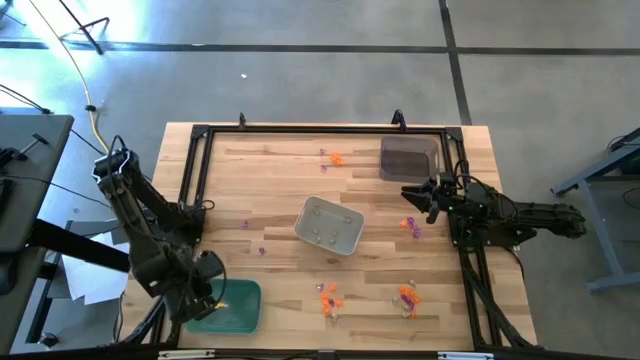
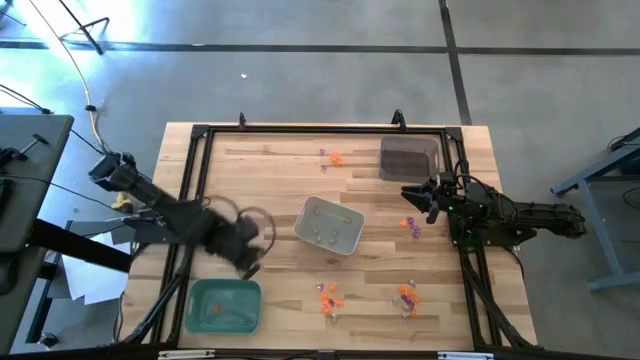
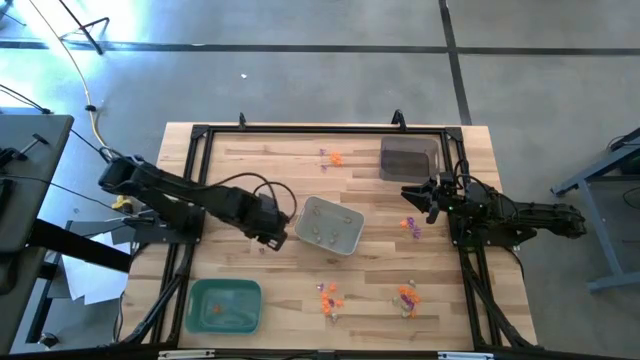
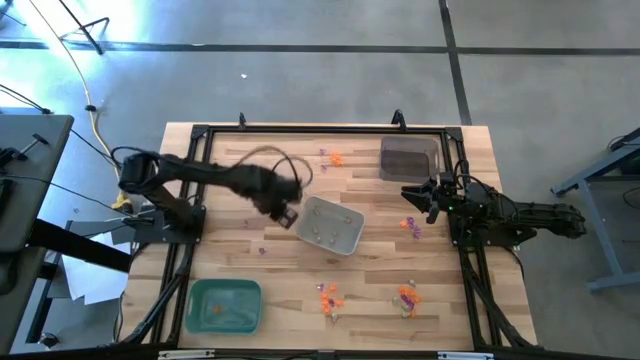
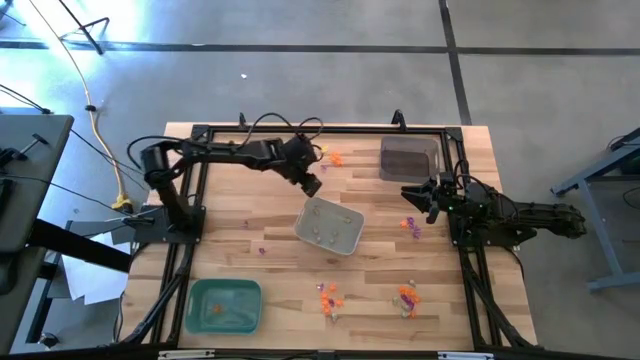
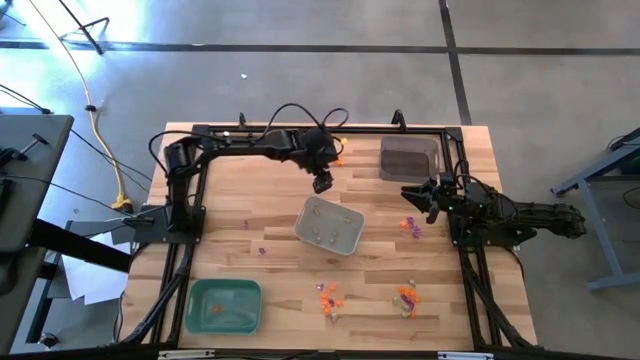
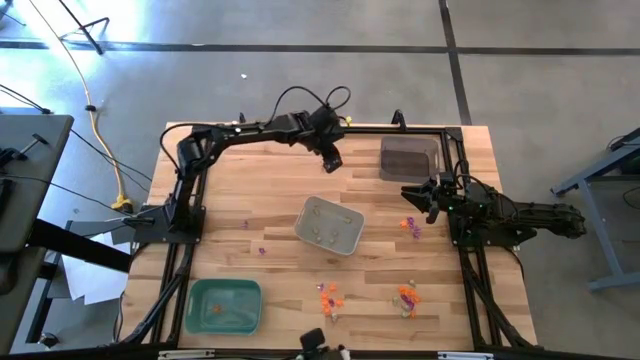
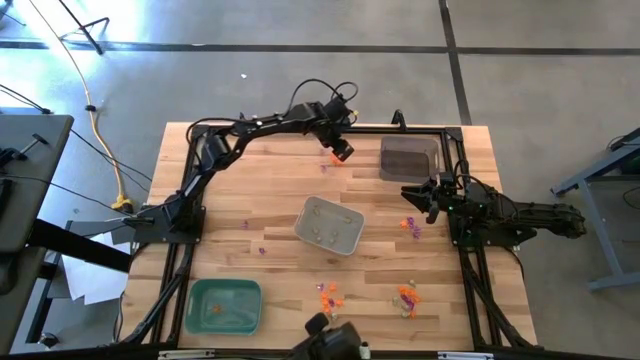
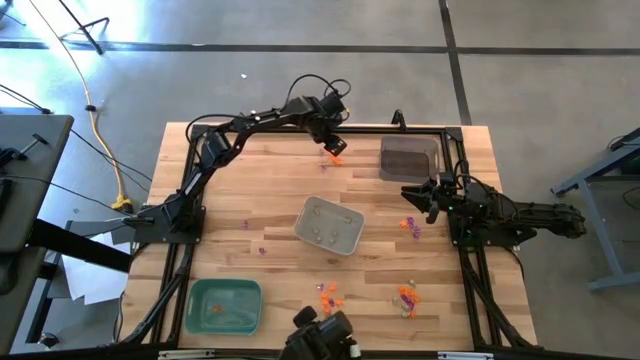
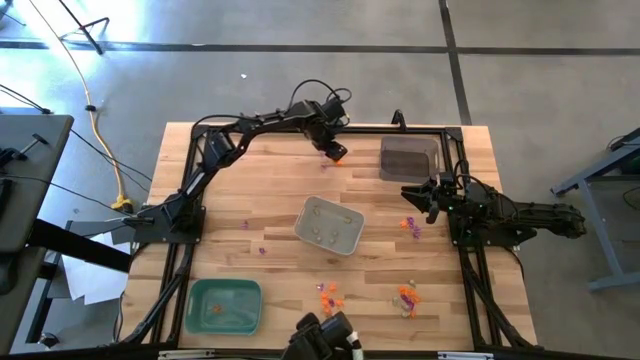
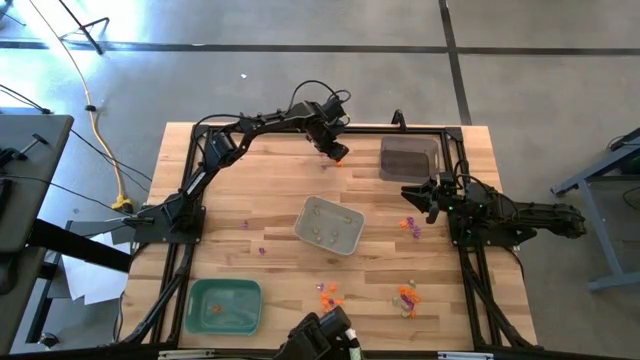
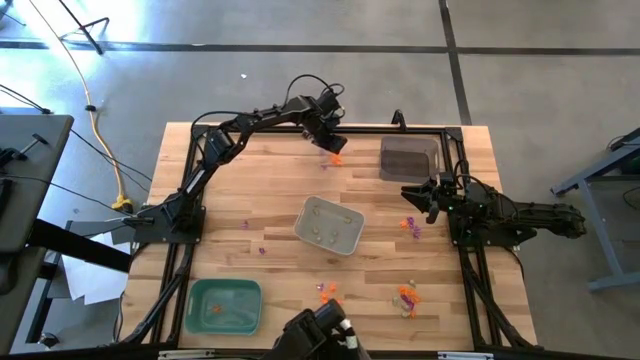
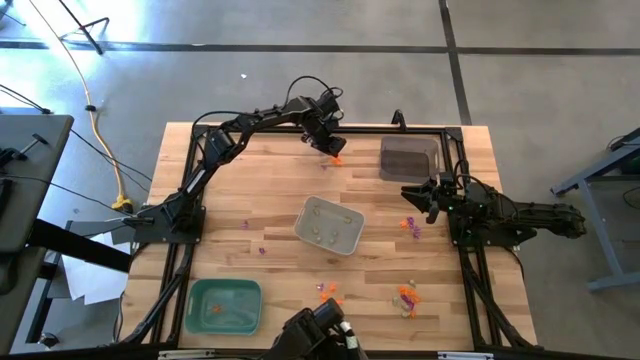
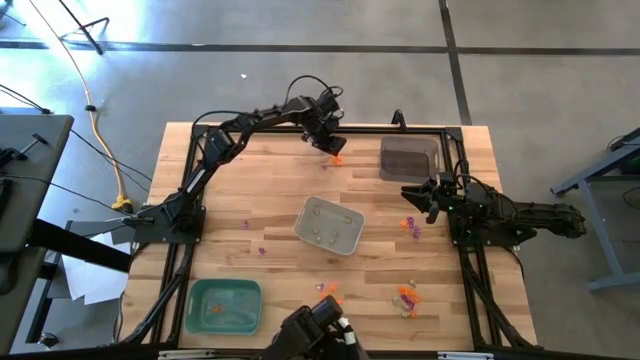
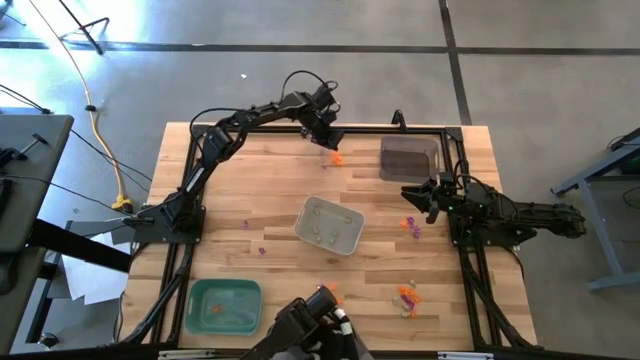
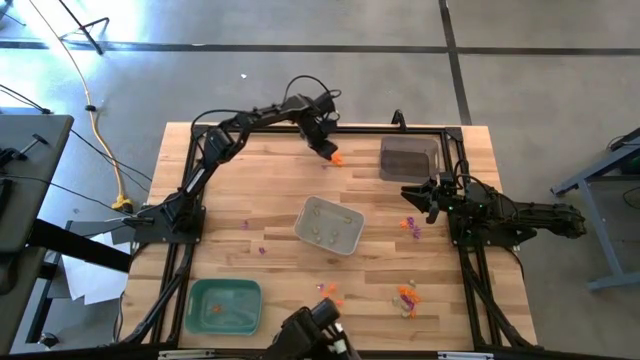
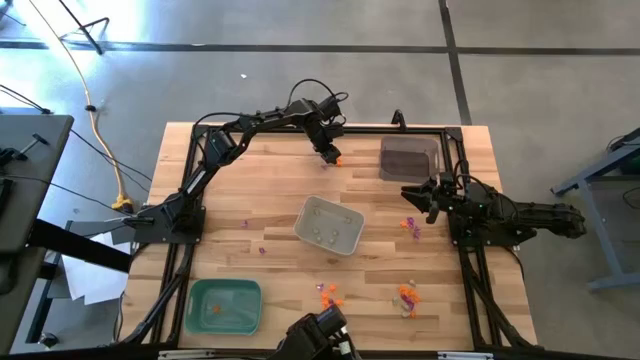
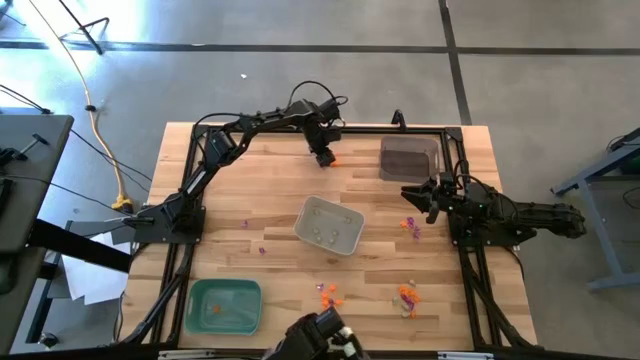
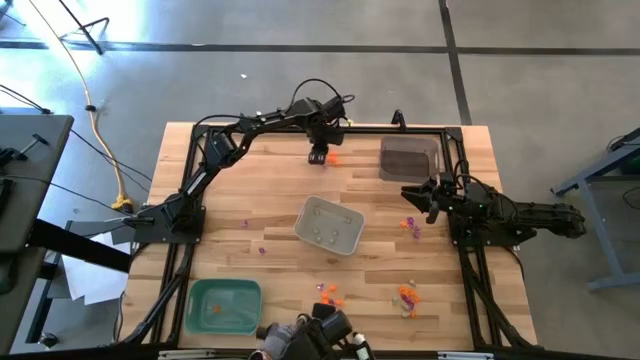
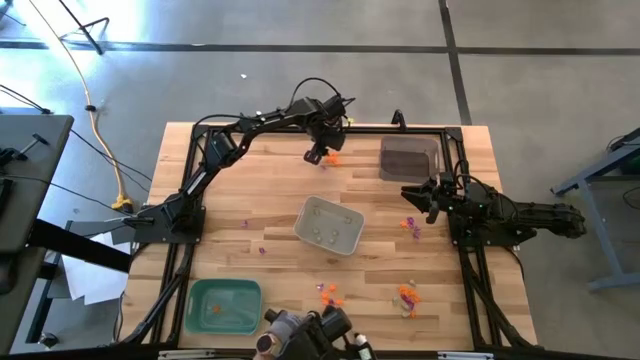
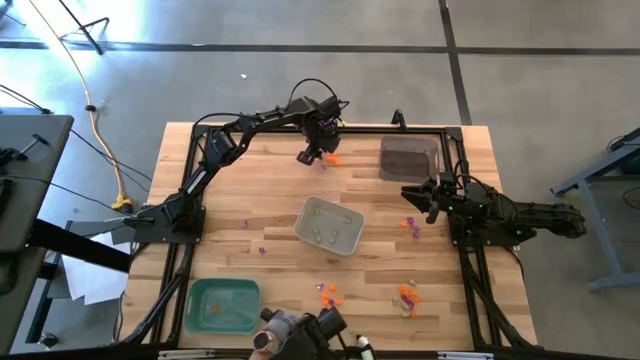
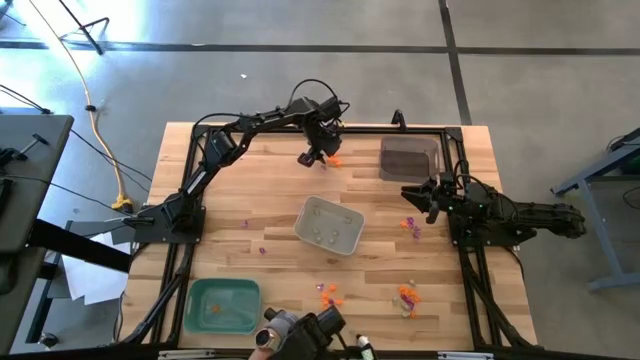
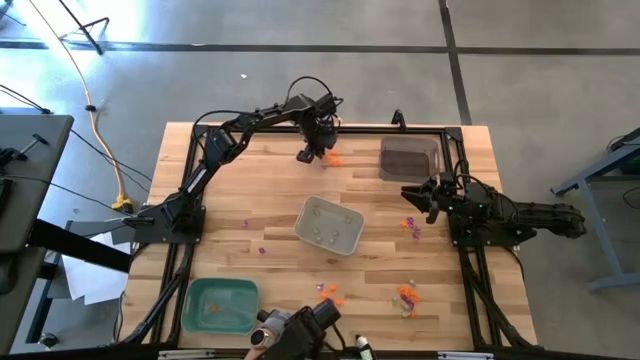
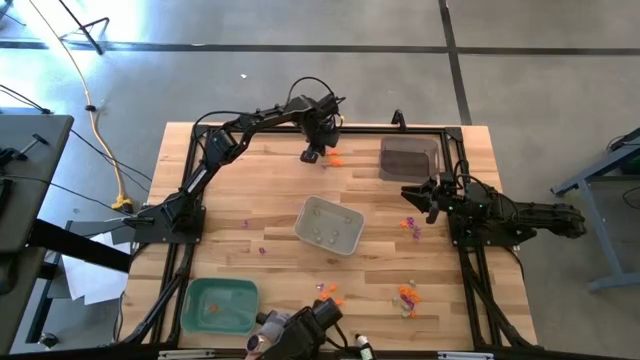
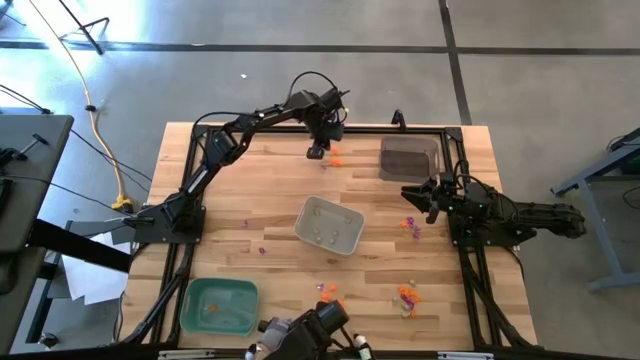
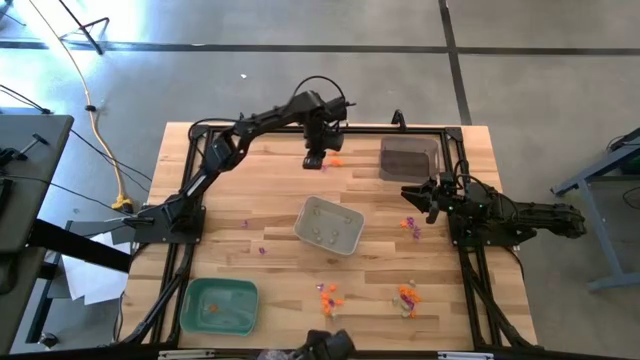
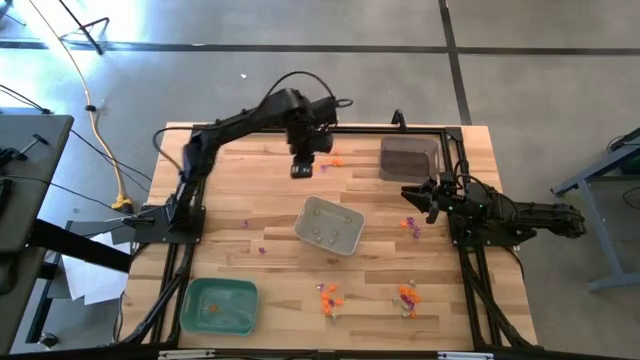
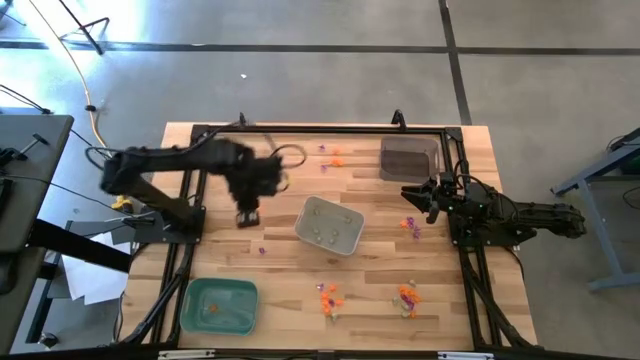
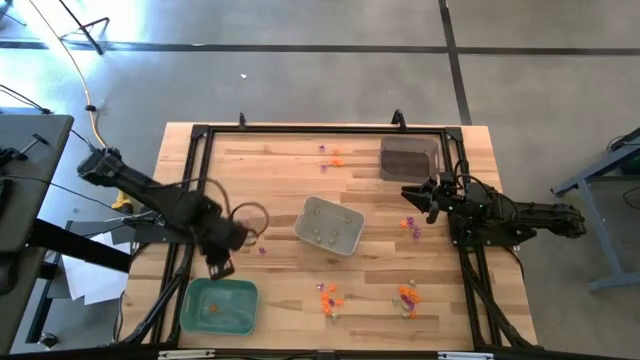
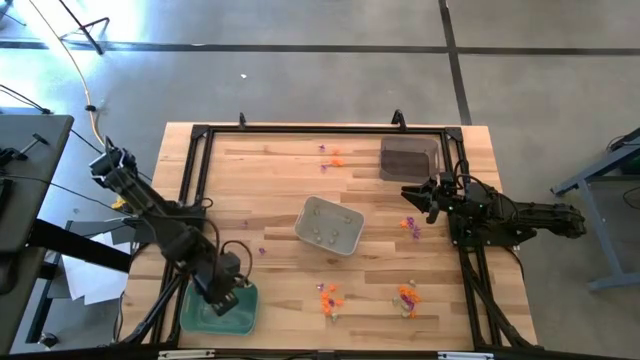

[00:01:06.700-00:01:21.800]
Task: Sort Halloween decoration
Put the orange spider toy into the green bin

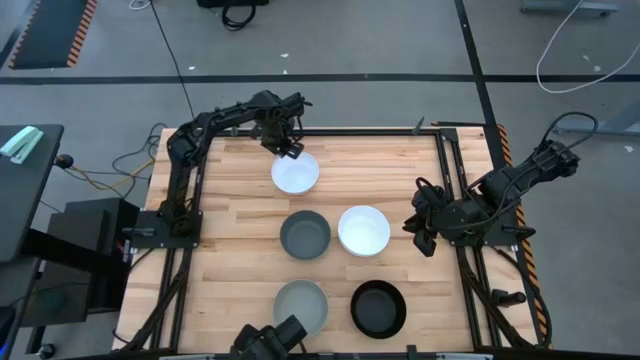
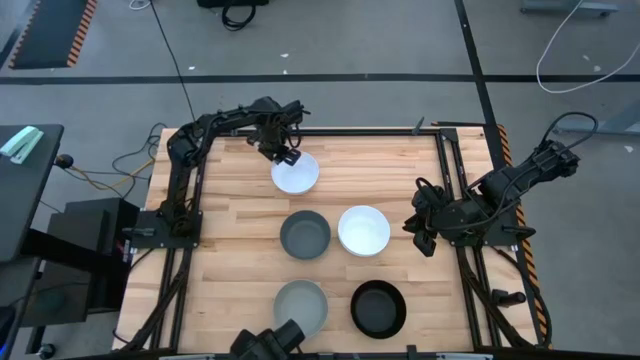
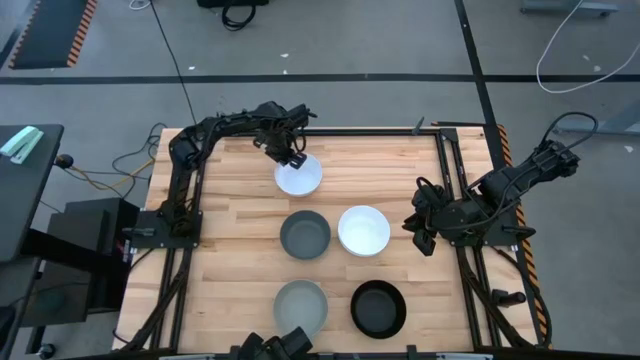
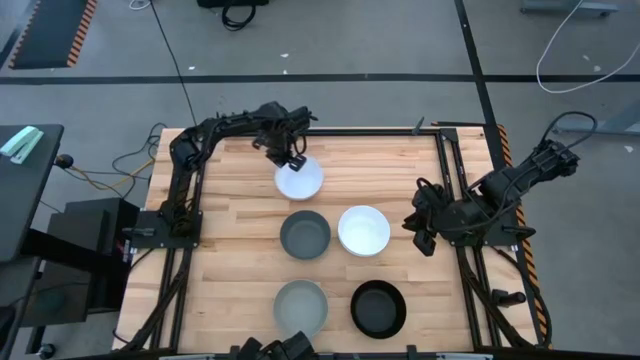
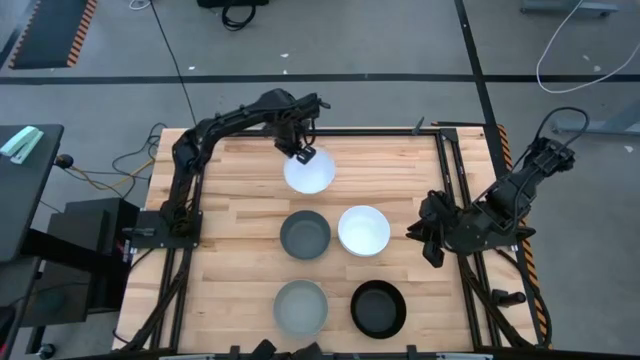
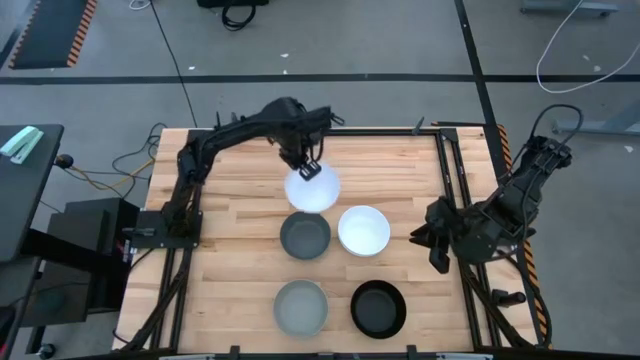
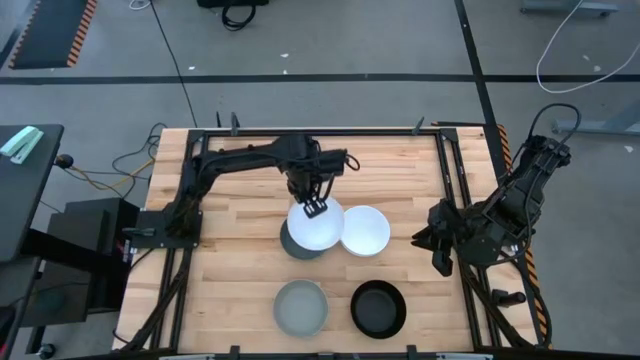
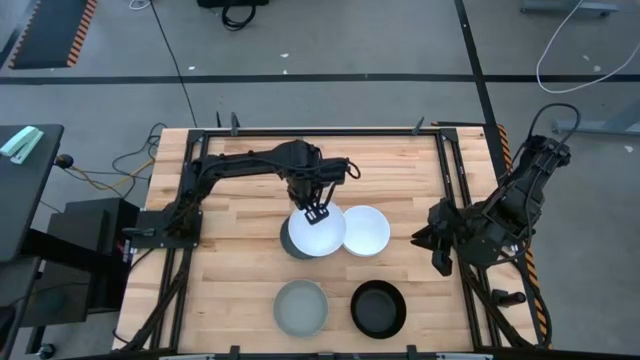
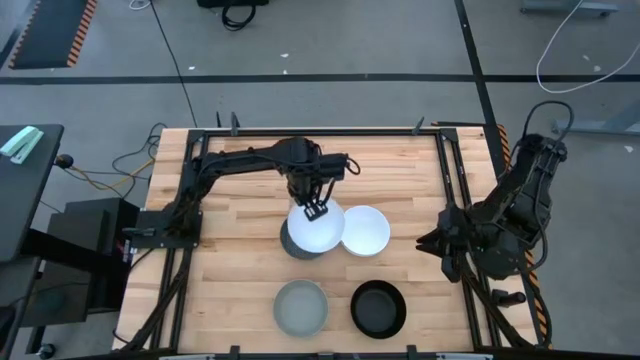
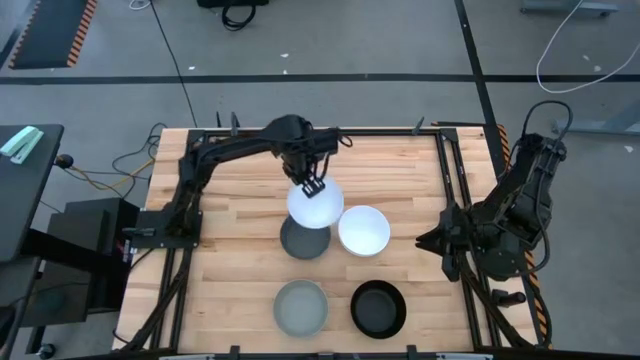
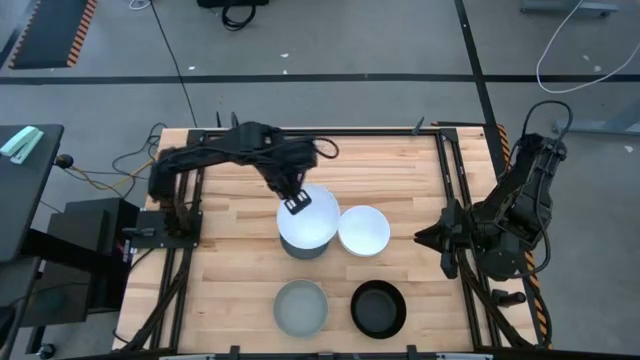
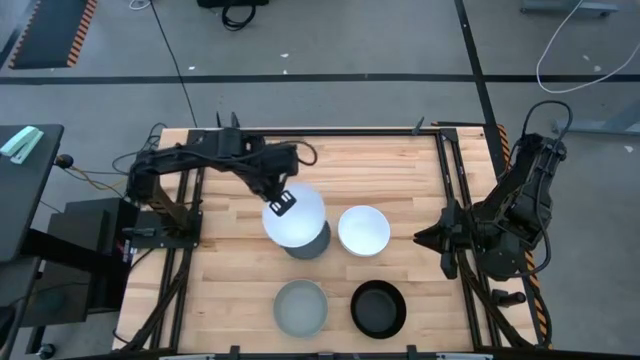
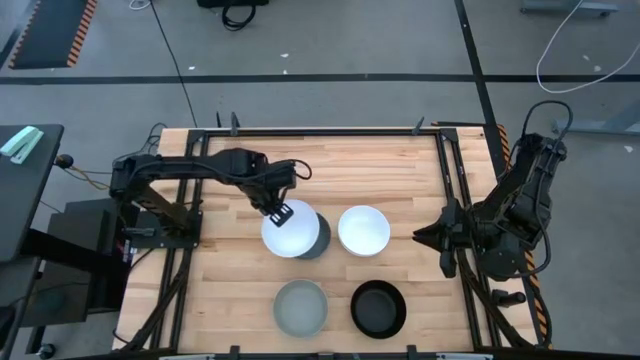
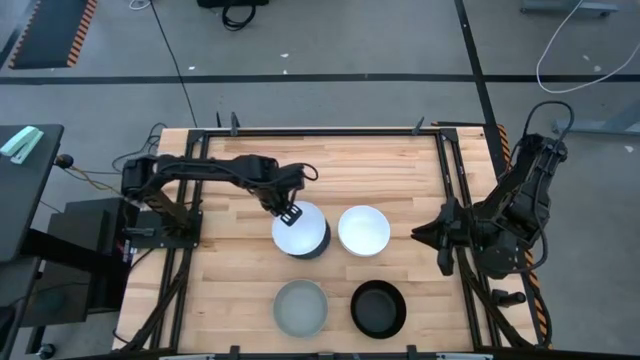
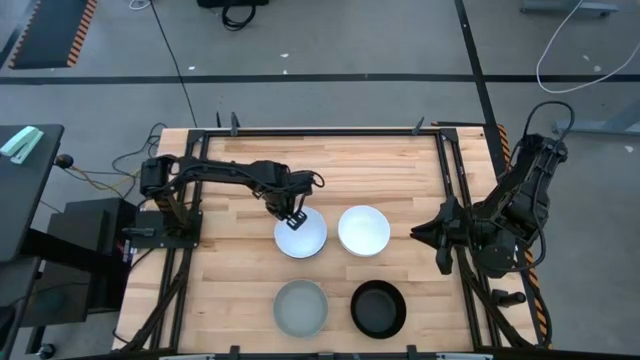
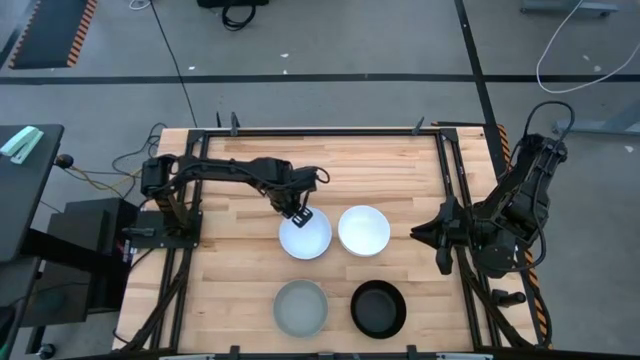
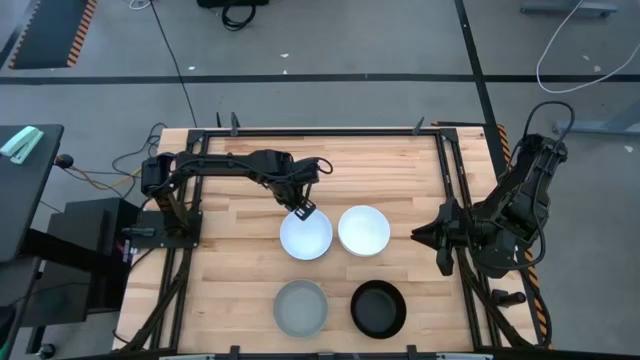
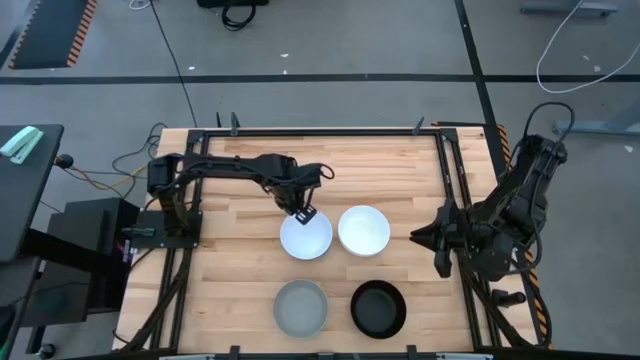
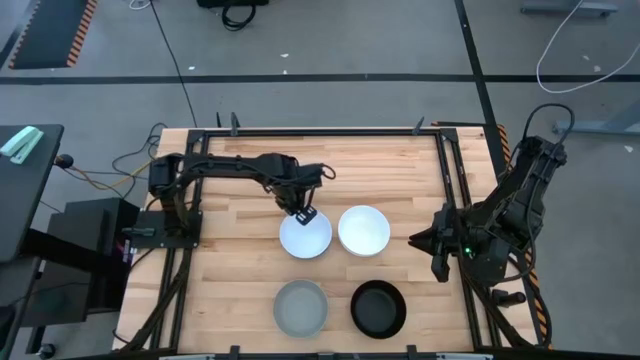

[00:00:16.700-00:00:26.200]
Task: Nest bowls inside each other
Stack the left white bowl on the dark gray bowl
